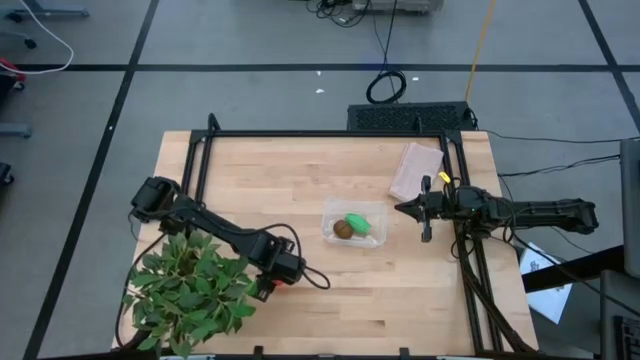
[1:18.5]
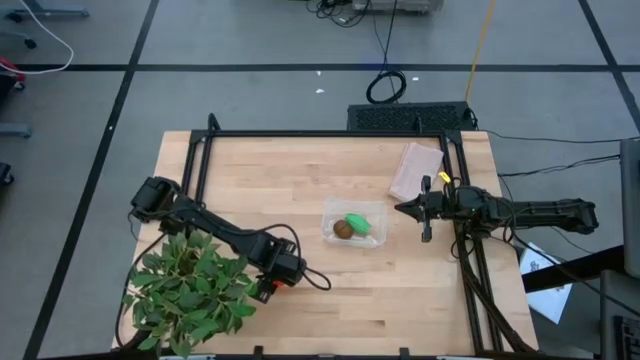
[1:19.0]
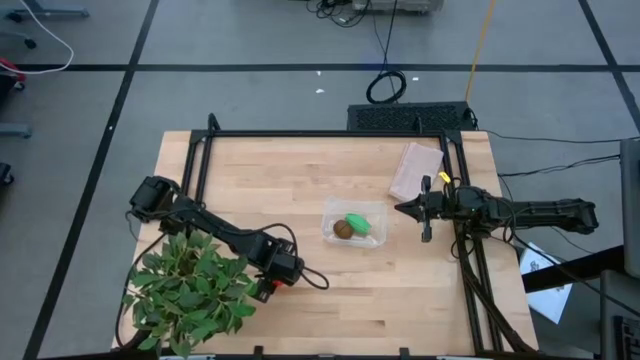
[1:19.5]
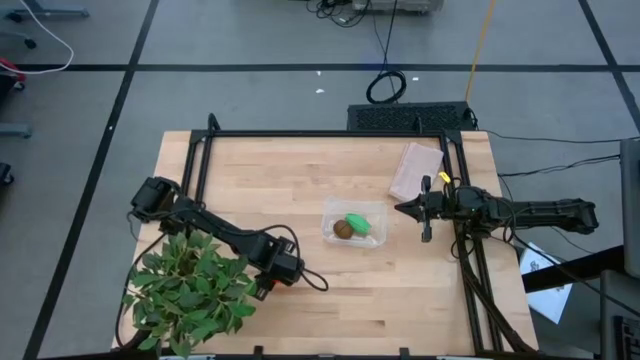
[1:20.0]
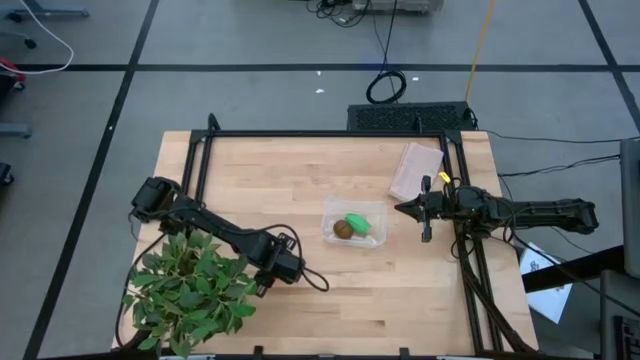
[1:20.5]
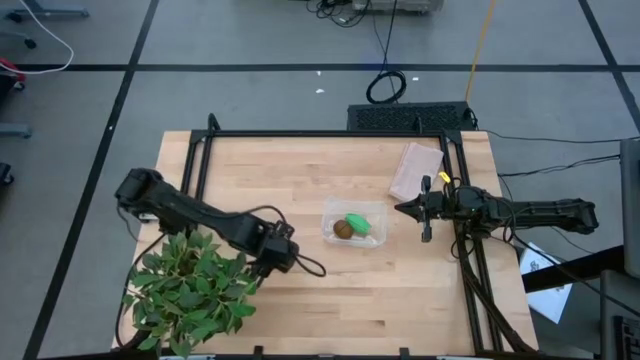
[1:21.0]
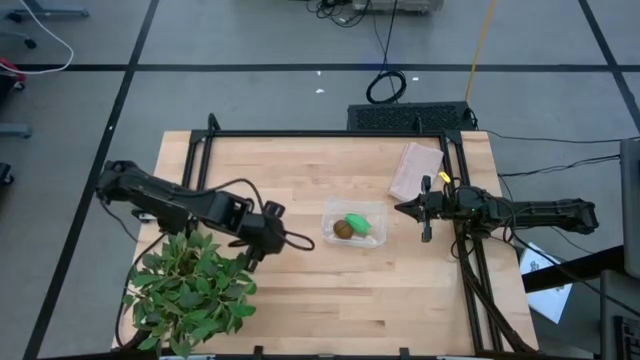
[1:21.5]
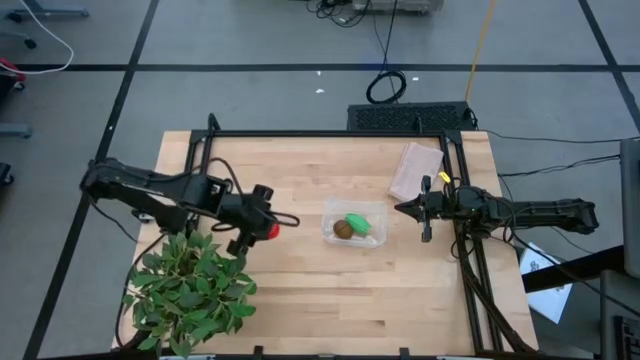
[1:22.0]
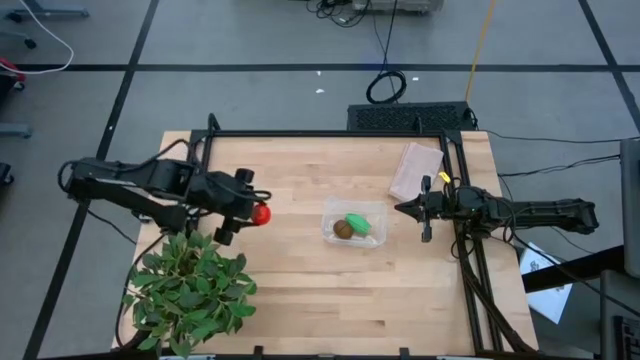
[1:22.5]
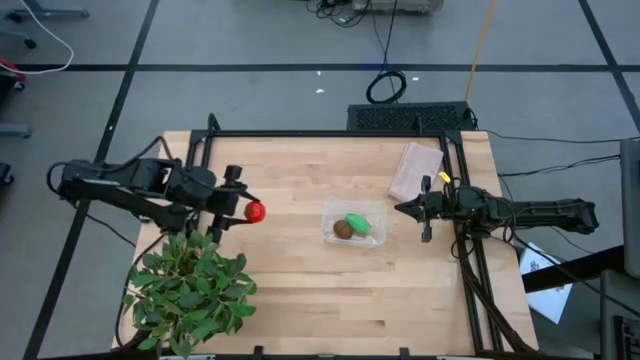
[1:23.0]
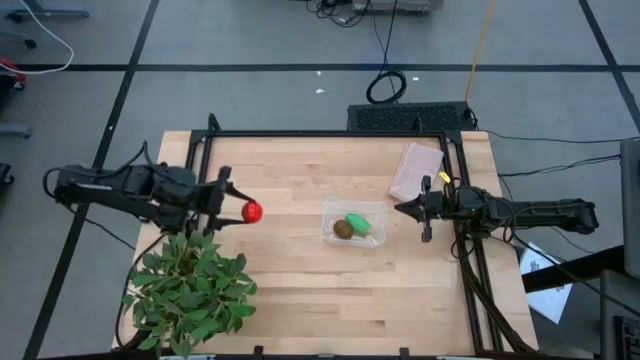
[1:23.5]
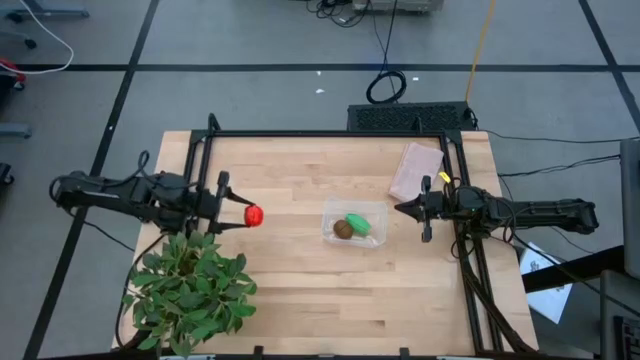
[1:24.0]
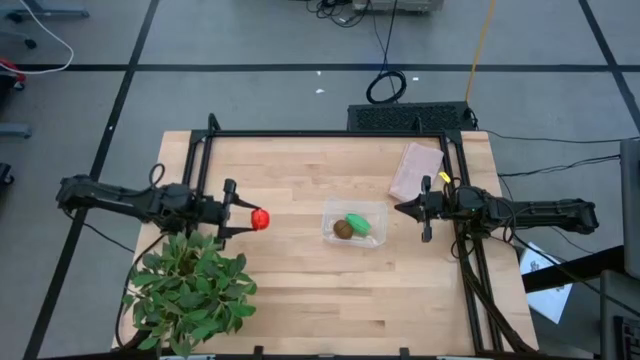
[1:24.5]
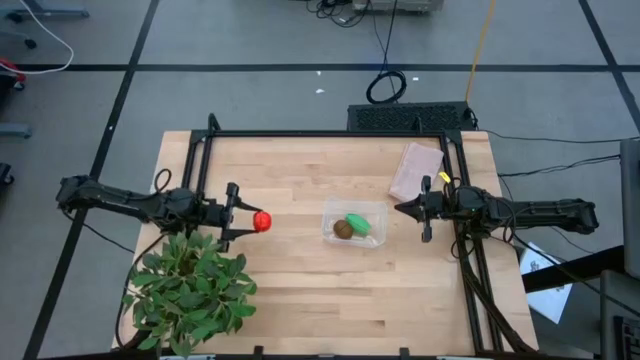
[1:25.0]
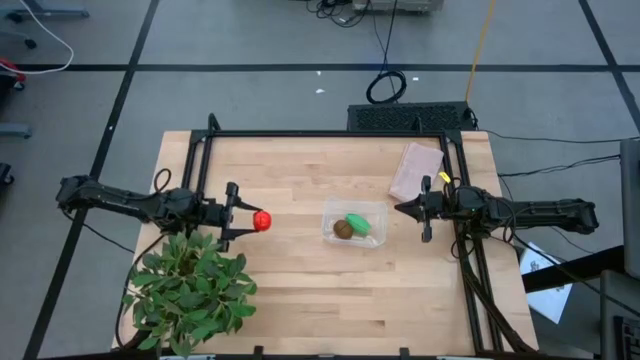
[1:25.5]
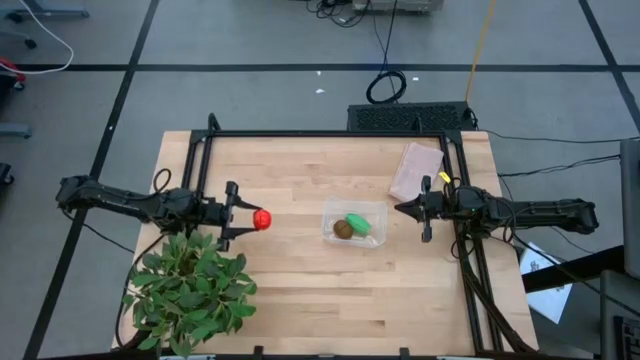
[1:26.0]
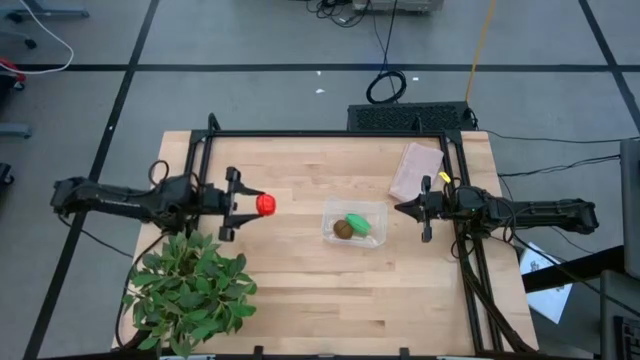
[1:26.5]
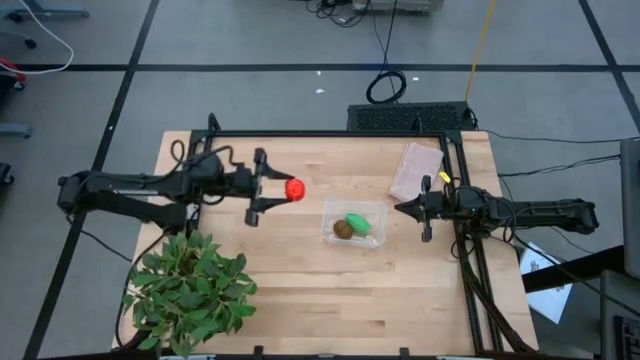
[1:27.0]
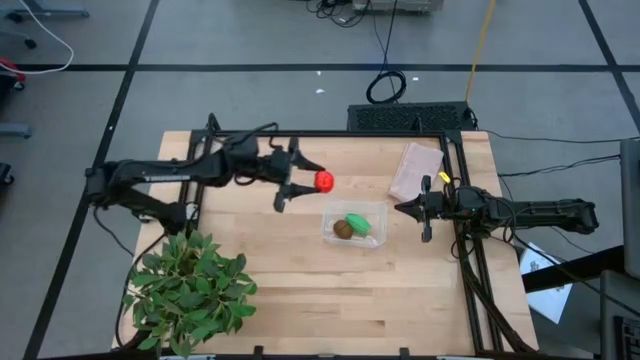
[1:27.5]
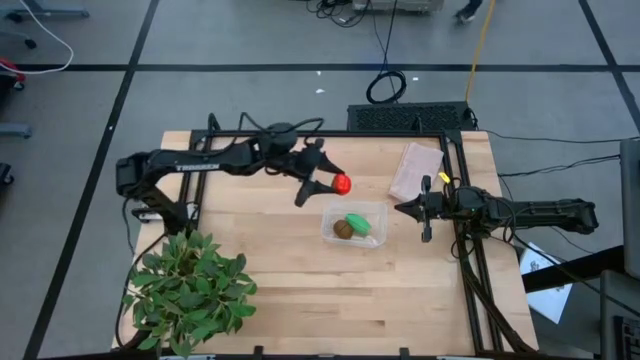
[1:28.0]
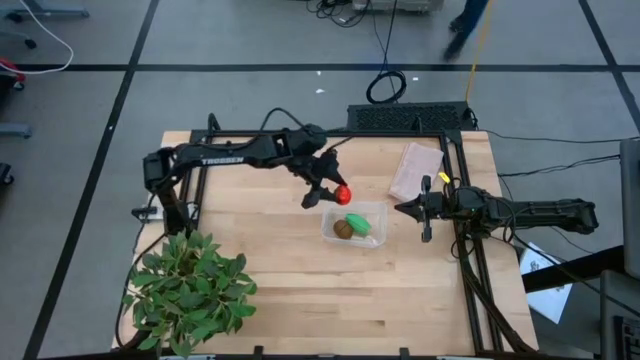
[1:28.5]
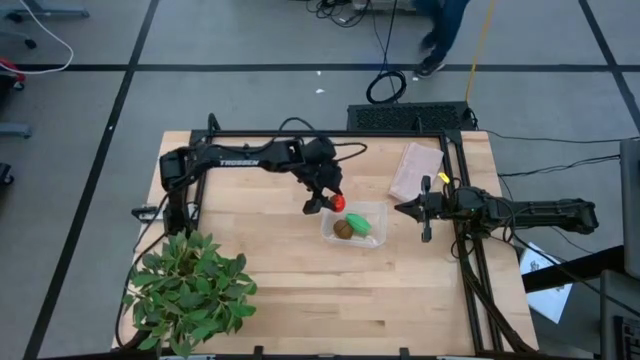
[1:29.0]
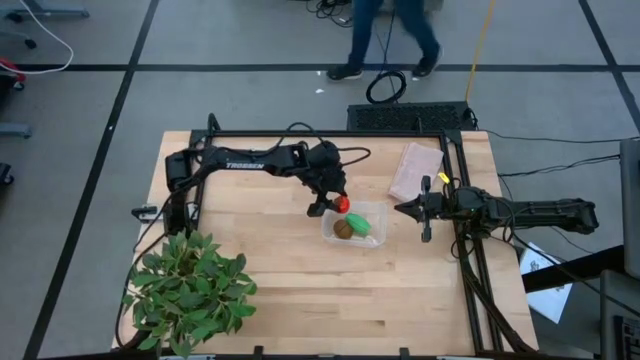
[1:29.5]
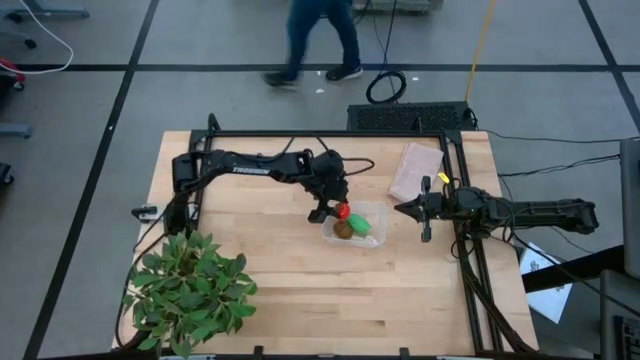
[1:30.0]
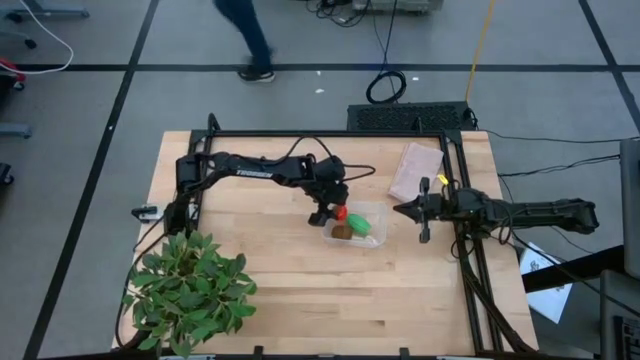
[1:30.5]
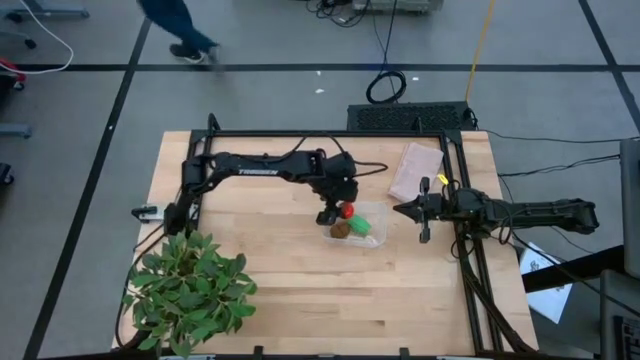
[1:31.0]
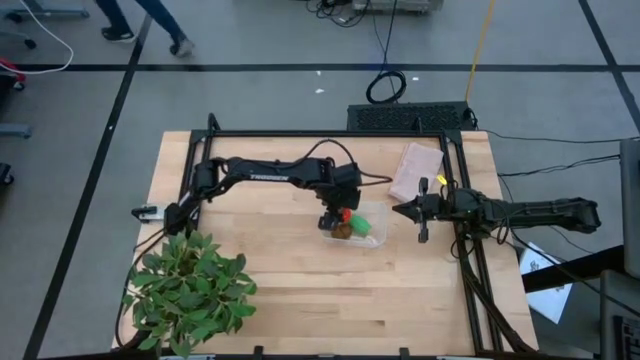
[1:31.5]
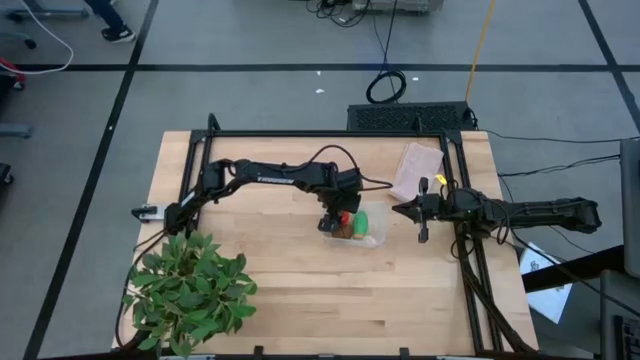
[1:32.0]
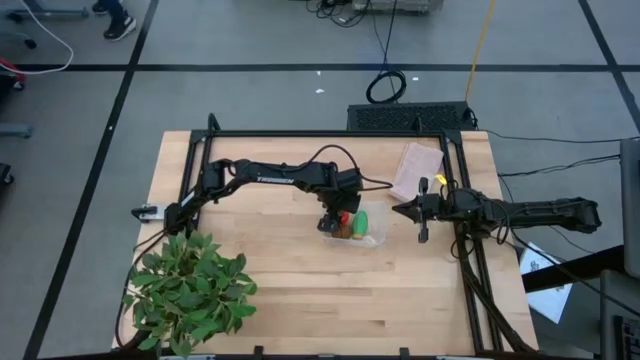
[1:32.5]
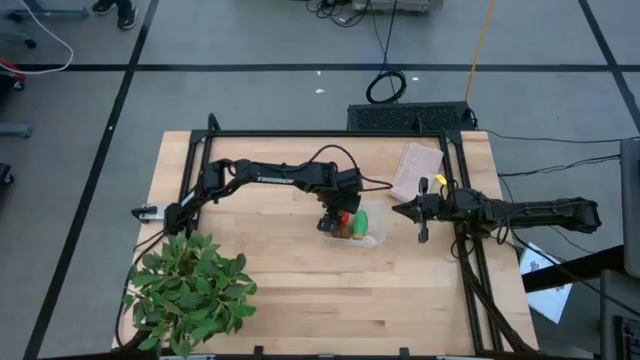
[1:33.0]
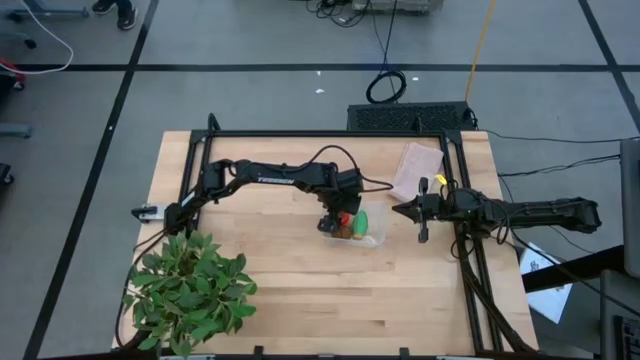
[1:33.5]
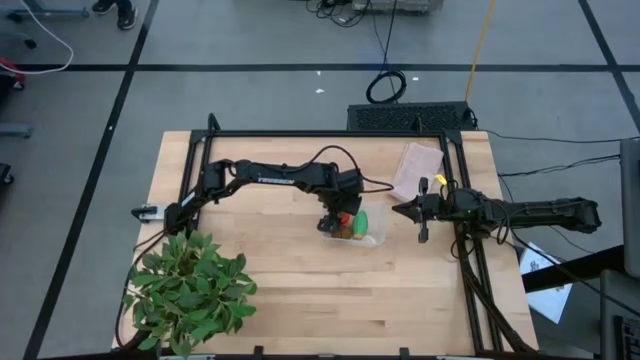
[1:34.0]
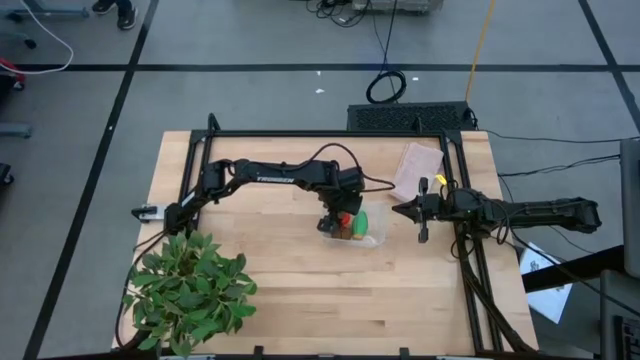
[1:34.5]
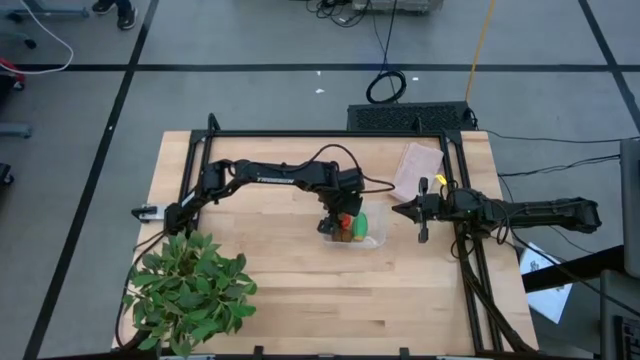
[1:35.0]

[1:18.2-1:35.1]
Task: Pick and placing Produce into tupperware
Put the red tomato into the transparent bin
